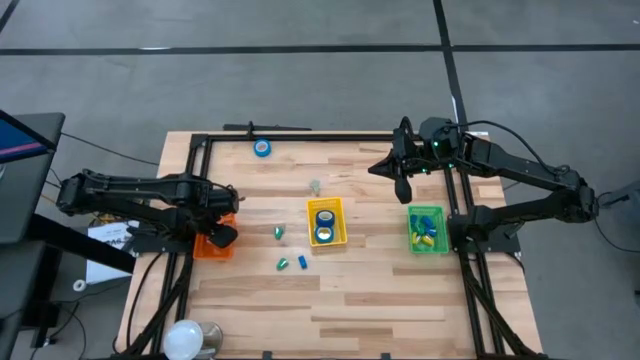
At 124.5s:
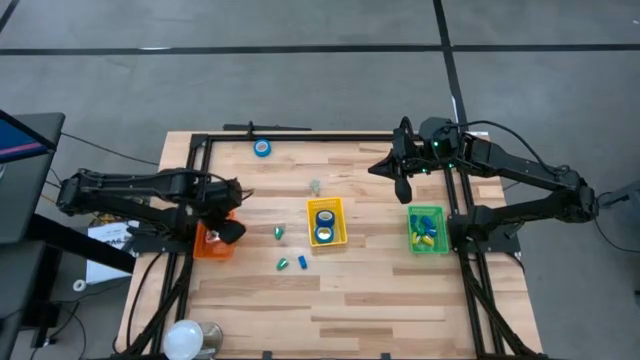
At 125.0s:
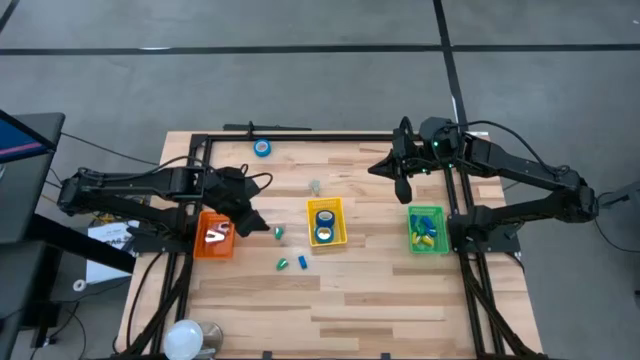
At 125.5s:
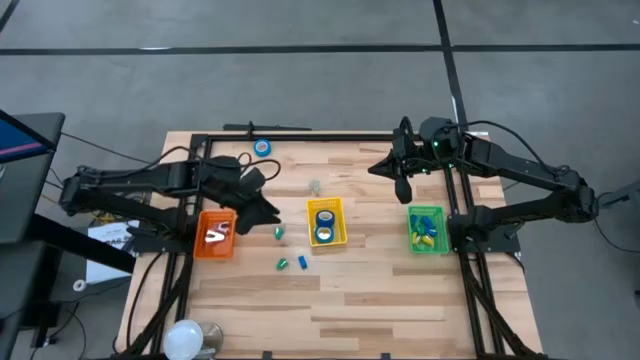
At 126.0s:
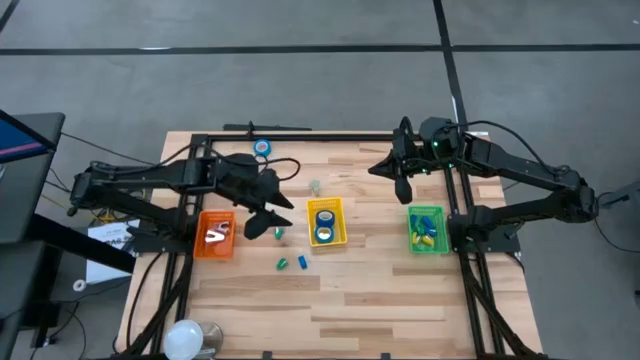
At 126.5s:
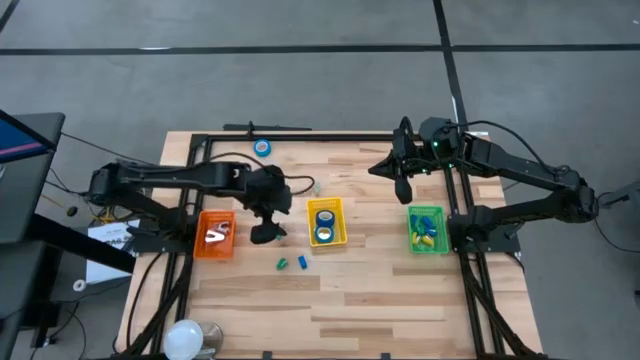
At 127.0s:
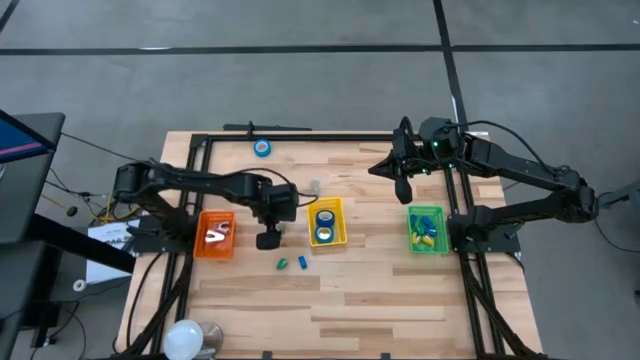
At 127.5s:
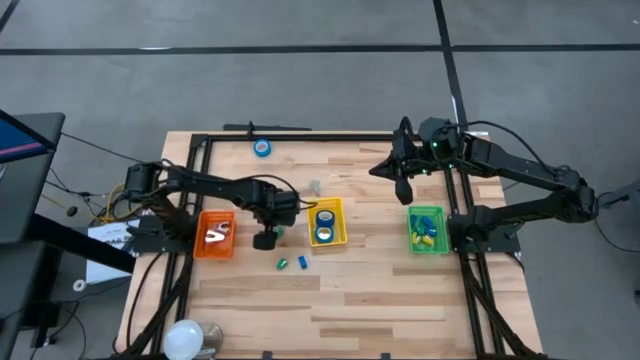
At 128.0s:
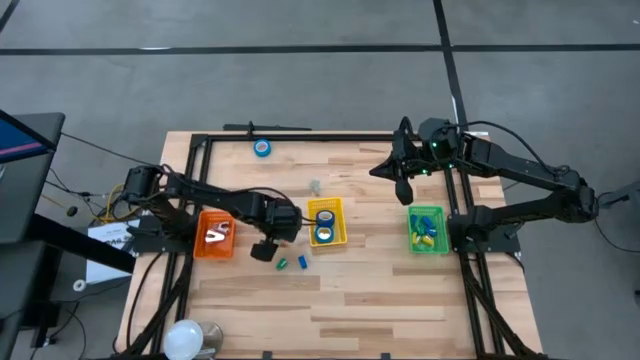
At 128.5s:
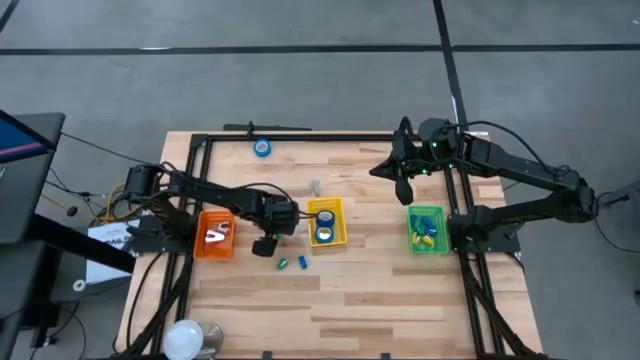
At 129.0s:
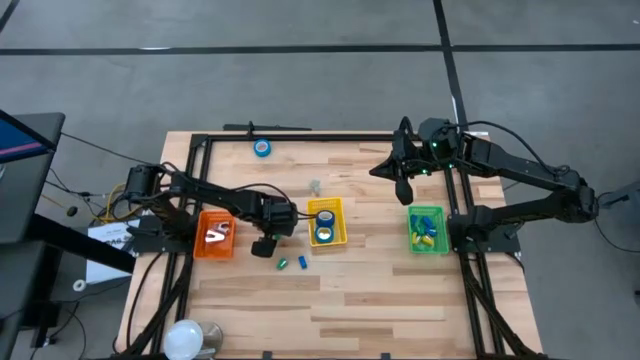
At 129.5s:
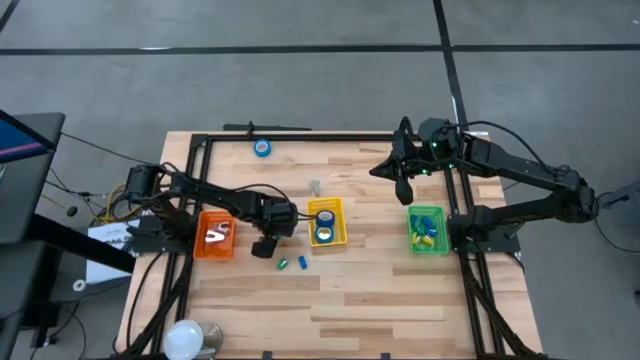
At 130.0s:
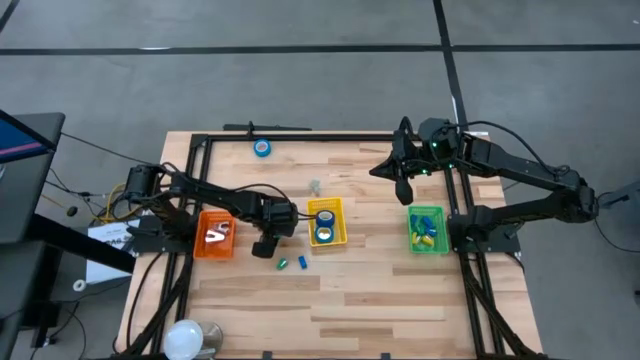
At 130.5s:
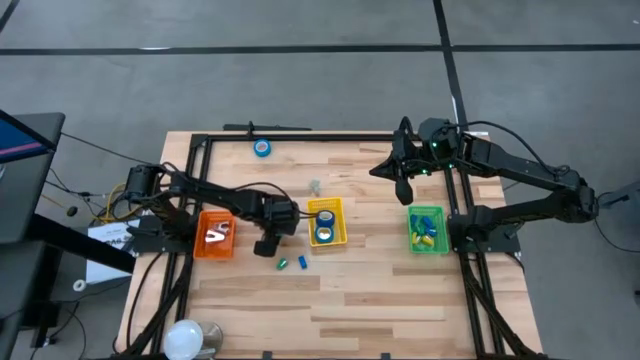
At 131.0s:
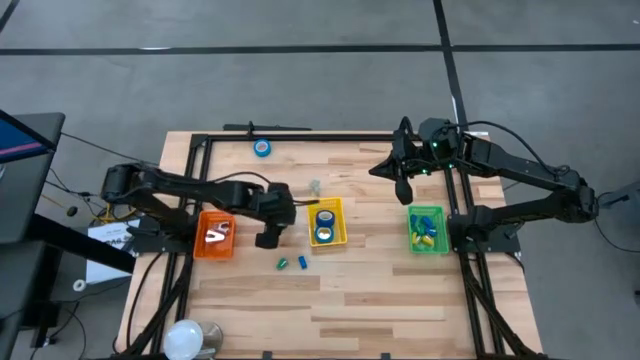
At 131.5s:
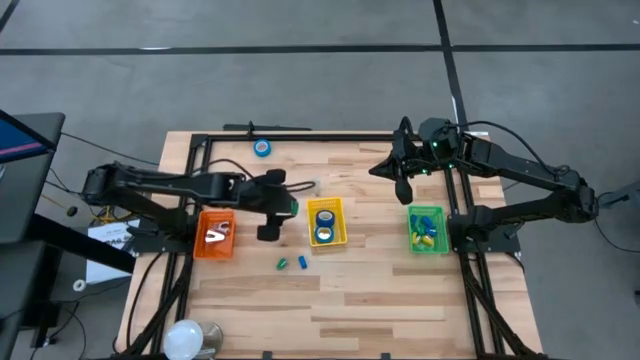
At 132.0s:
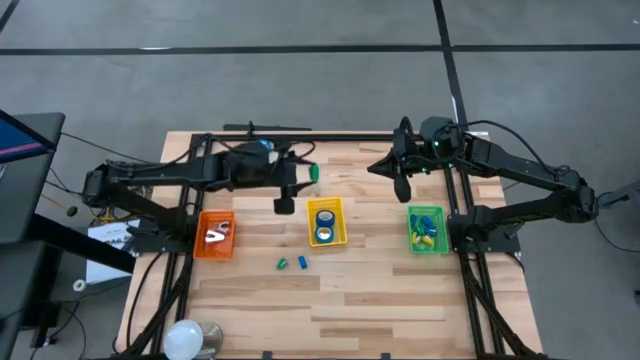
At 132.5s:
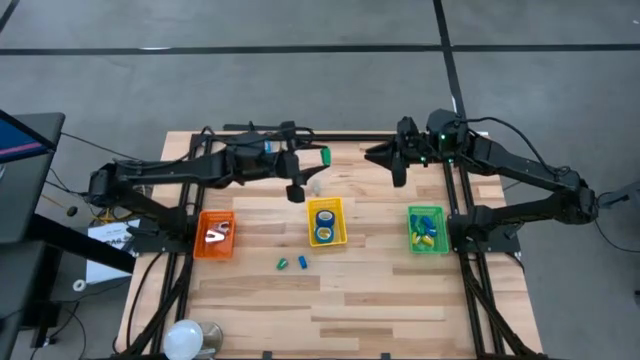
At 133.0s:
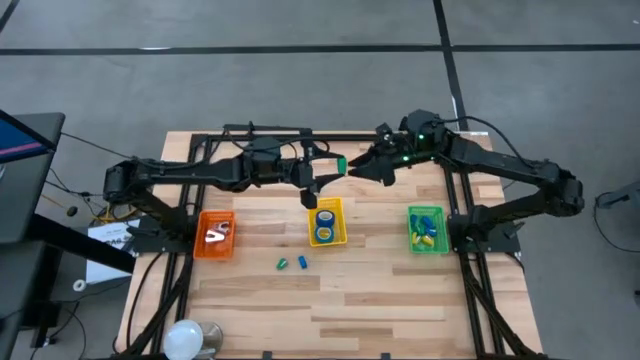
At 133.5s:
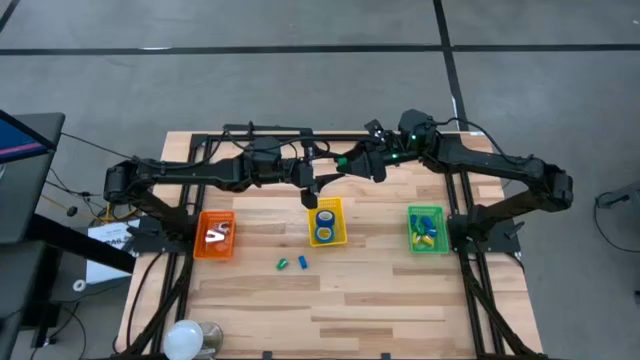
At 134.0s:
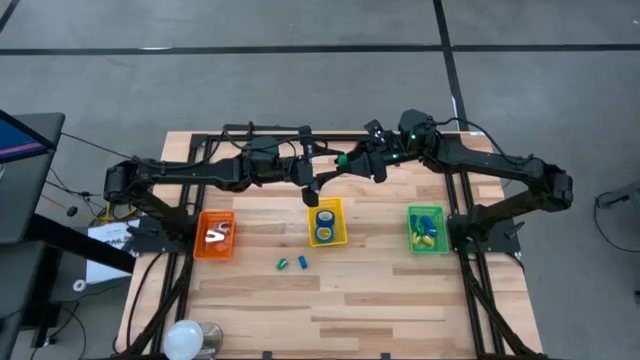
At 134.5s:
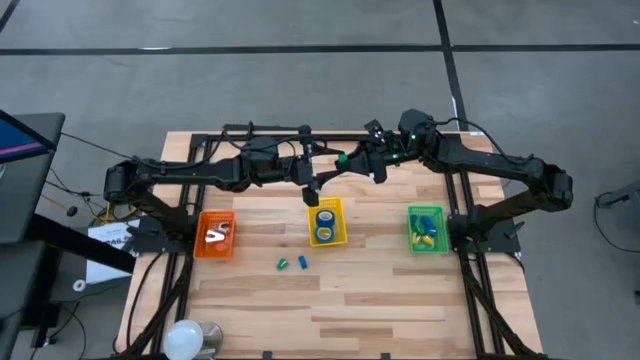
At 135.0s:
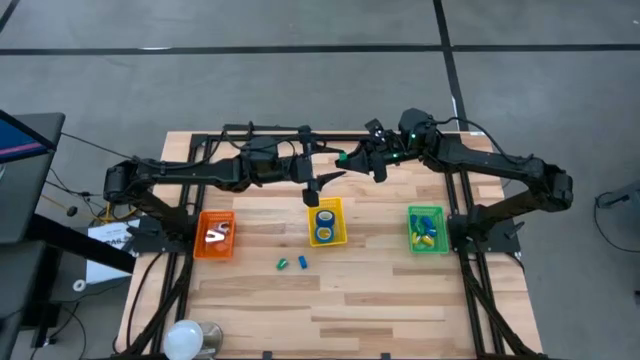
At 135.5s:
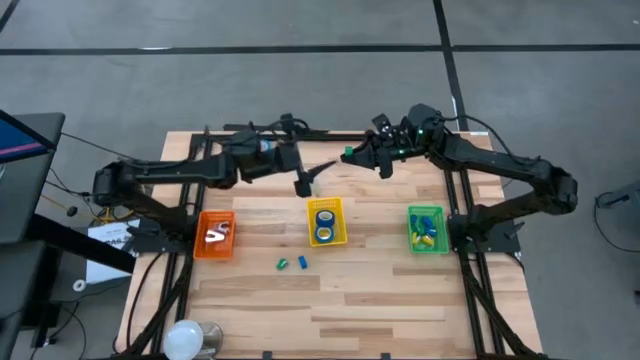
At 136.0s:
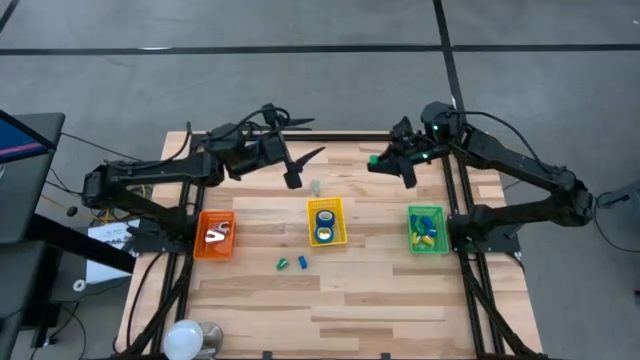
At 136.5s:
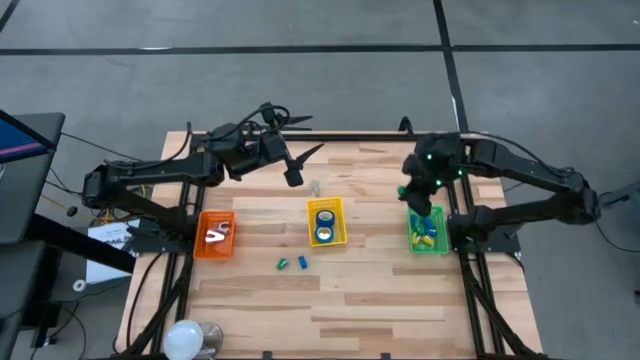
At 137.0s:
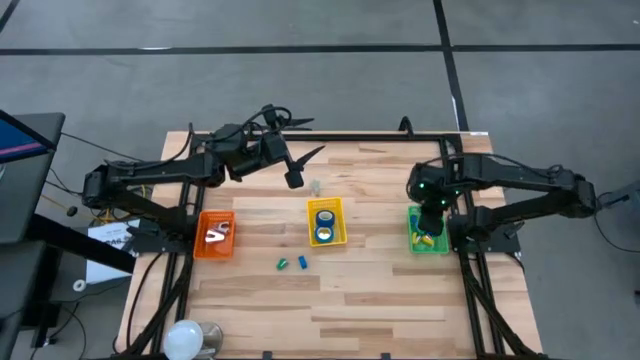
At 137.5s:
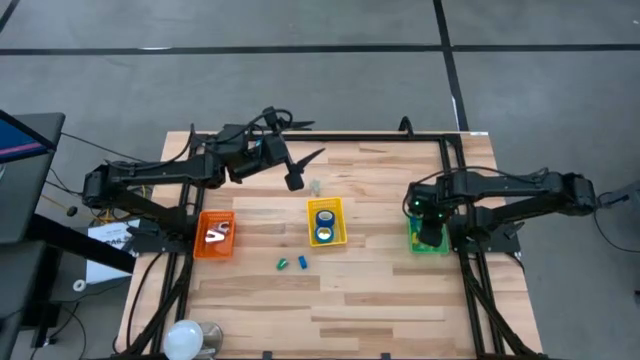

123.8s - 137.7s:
Task: Pick and place Stapler, Stapler remover, tape
Put the green stapler into the green basket

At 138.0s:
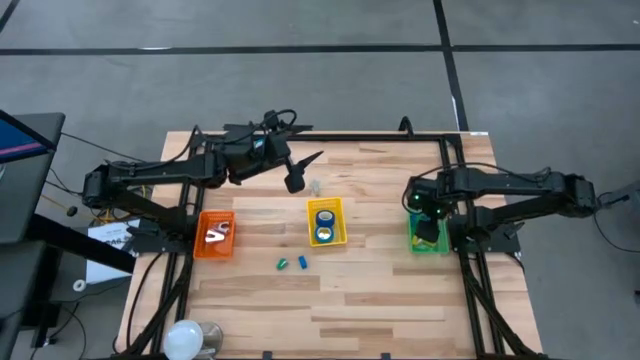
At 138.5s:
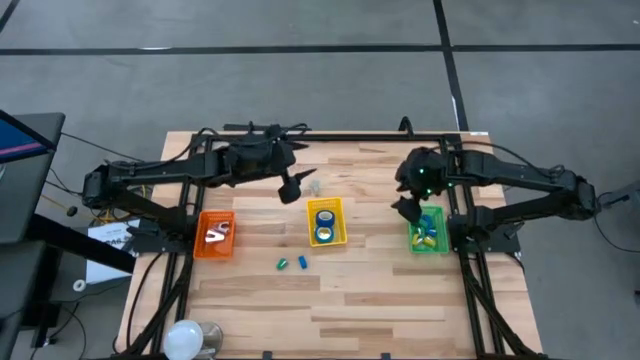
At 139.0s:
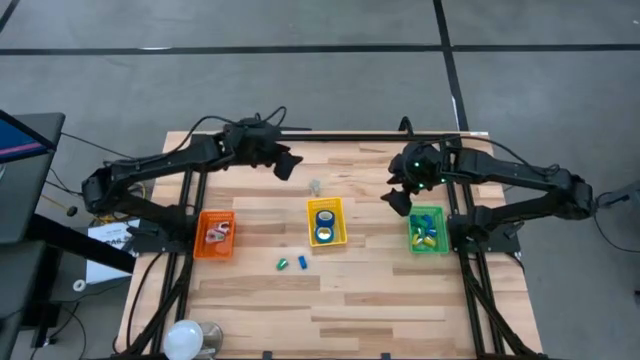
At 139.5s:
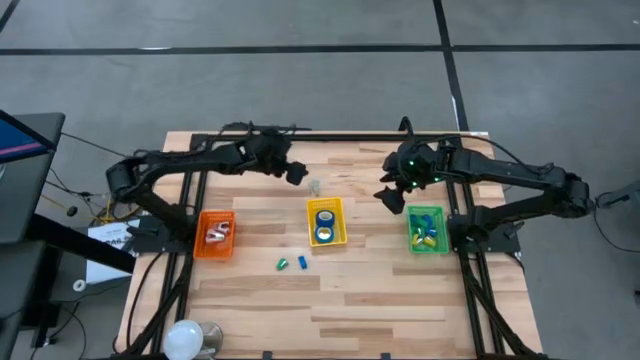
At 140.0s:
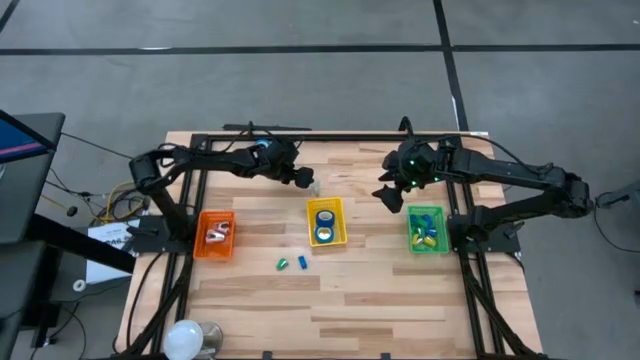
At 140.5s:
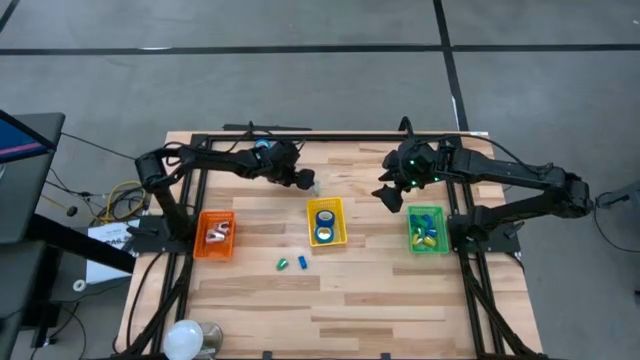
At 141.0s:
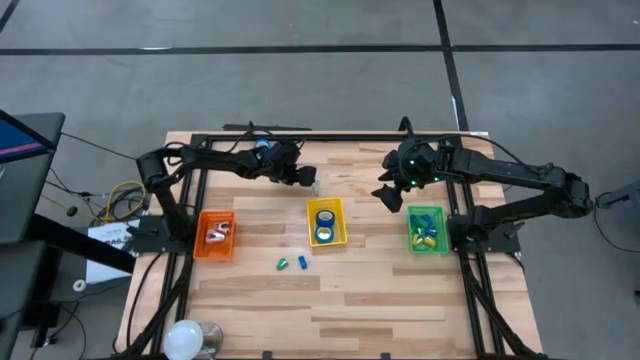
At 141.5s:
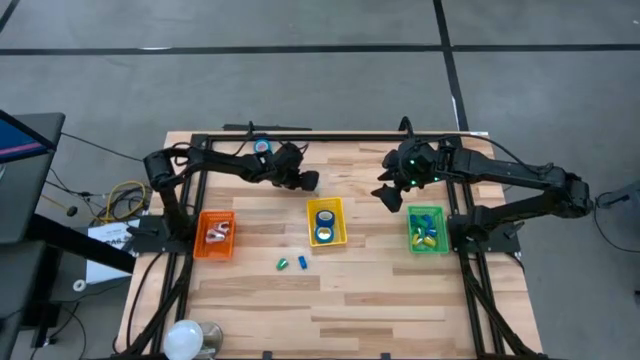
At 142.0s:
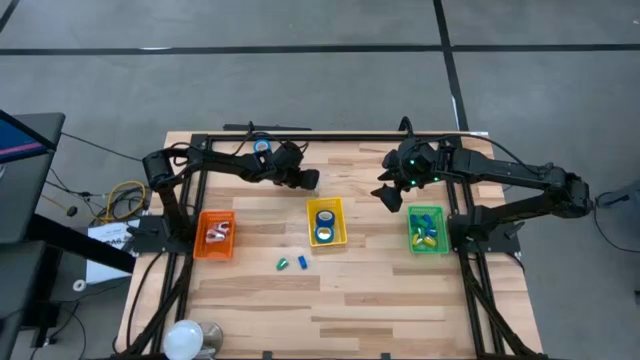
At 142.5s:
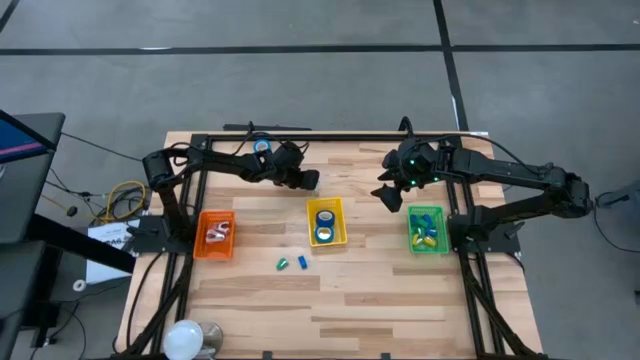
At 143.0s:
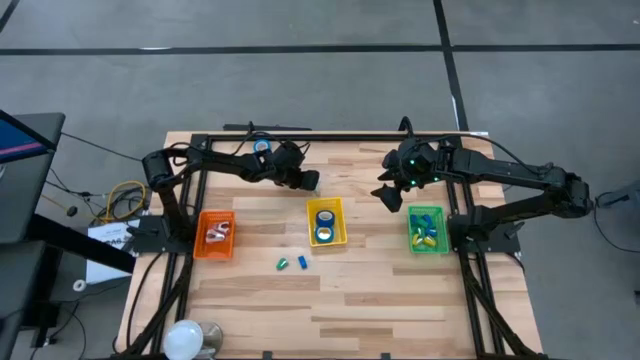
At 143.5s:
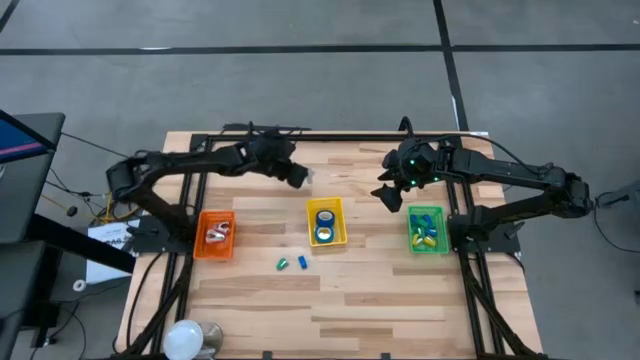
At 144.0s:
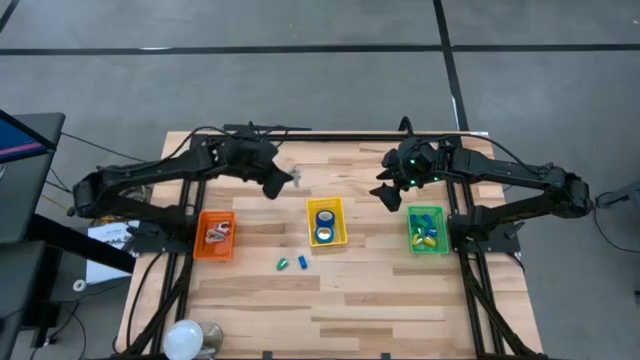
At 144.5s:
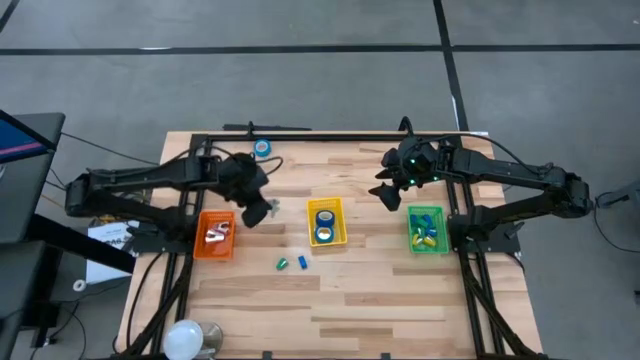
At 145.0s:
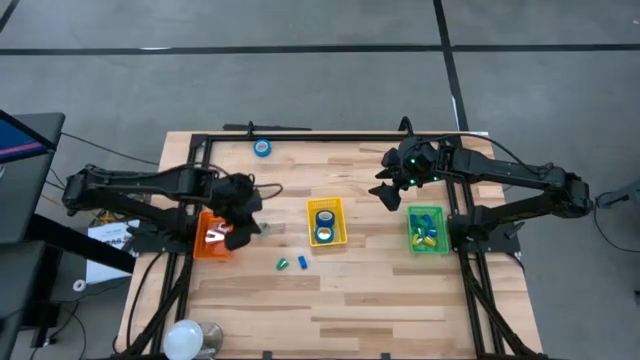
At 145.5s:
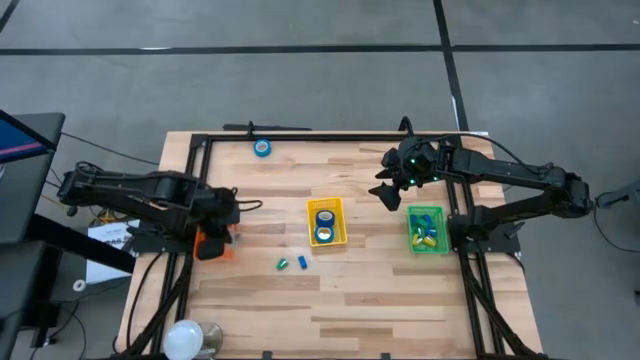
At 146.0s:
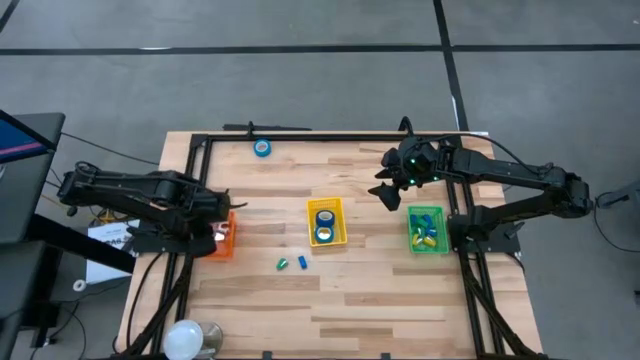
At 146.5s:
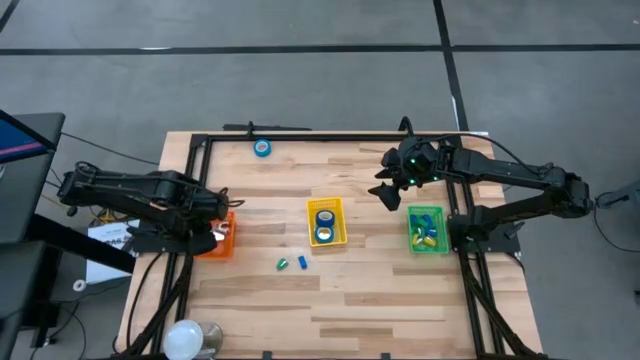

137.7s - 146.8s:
Put the green staple remover into the orange basket
